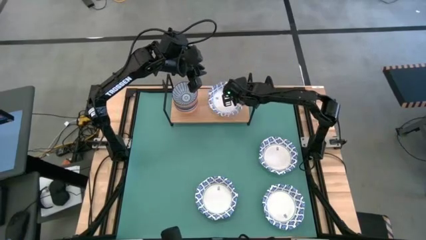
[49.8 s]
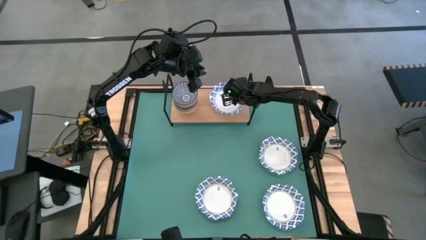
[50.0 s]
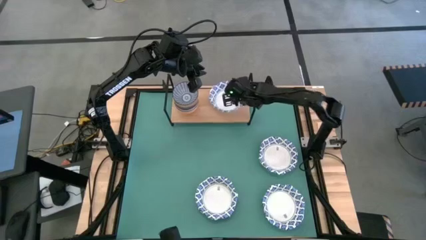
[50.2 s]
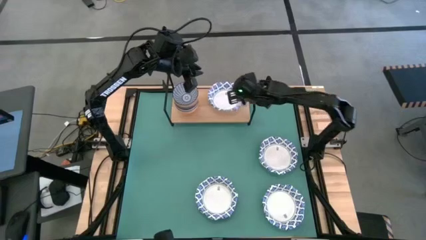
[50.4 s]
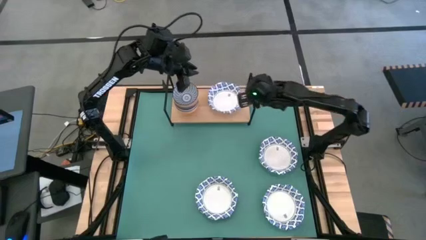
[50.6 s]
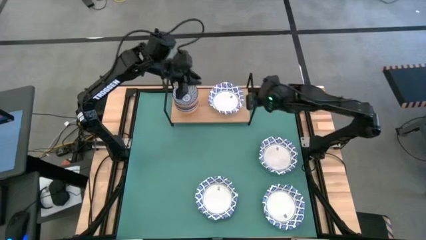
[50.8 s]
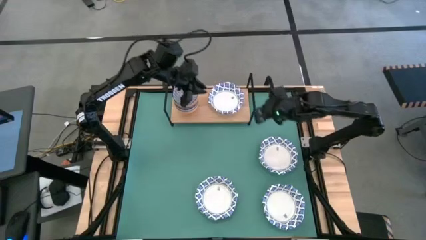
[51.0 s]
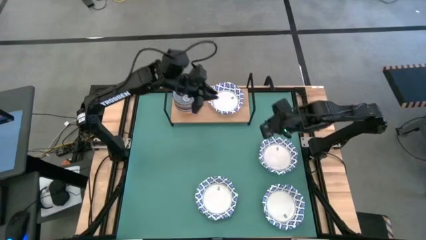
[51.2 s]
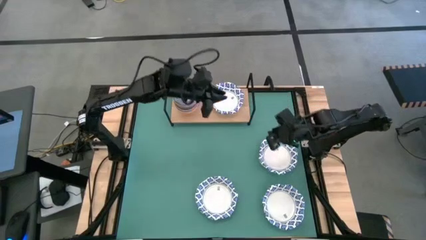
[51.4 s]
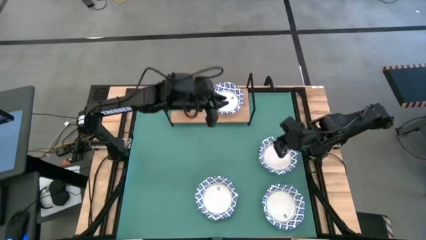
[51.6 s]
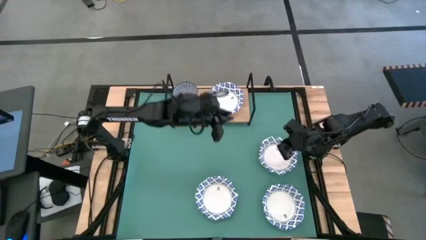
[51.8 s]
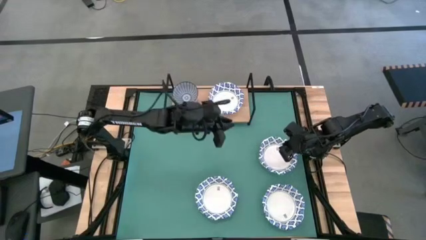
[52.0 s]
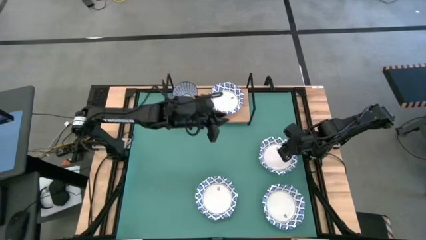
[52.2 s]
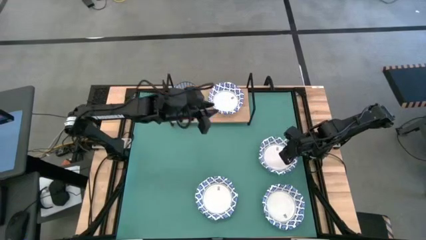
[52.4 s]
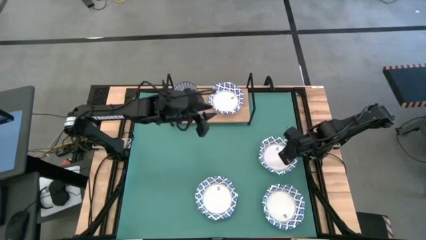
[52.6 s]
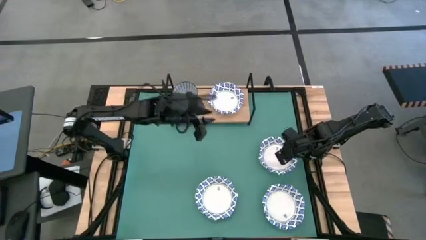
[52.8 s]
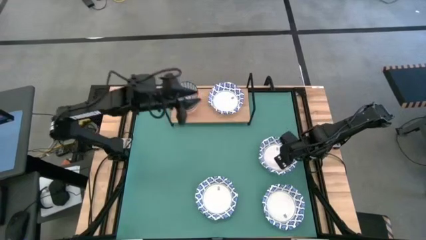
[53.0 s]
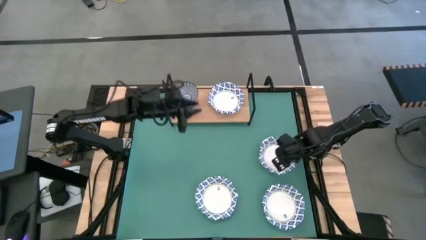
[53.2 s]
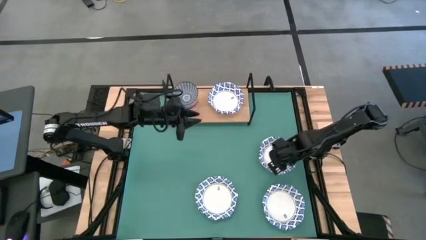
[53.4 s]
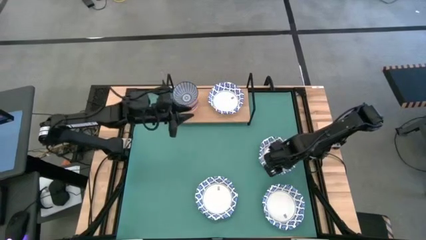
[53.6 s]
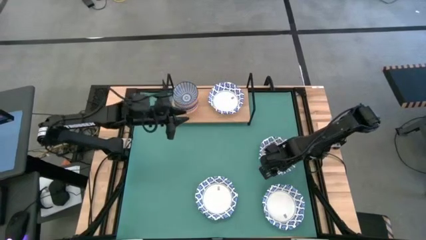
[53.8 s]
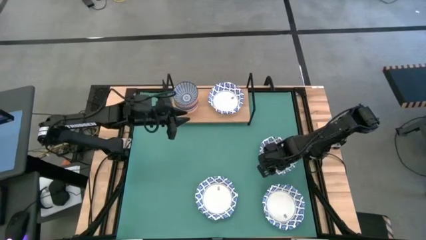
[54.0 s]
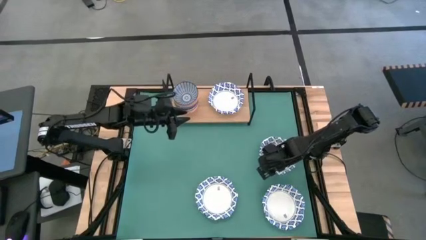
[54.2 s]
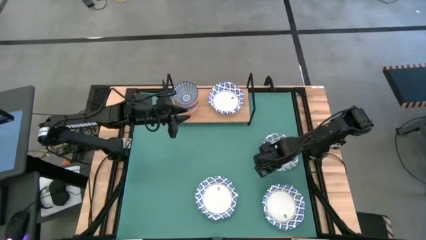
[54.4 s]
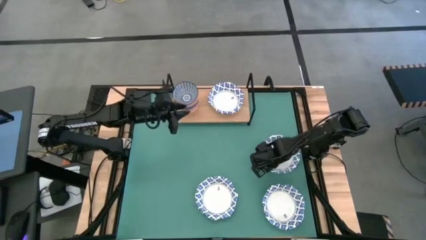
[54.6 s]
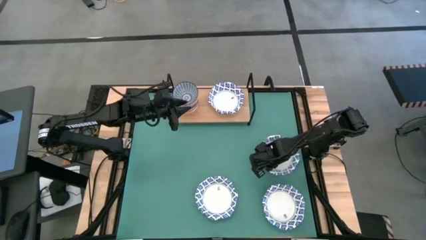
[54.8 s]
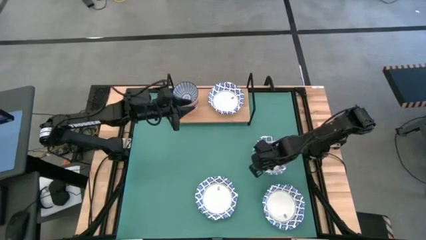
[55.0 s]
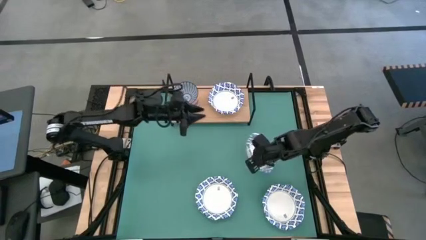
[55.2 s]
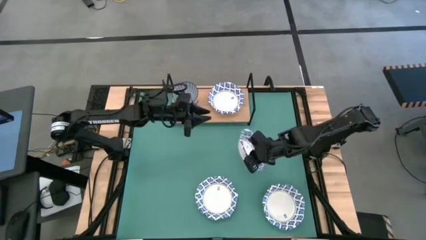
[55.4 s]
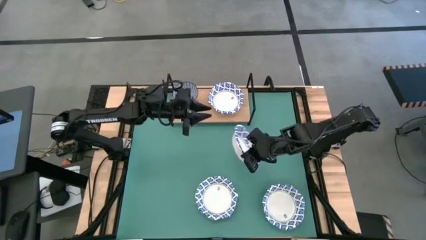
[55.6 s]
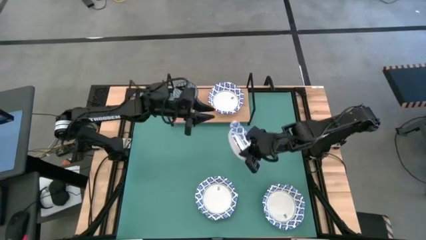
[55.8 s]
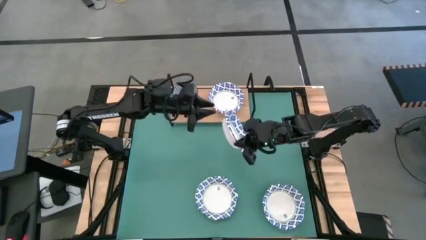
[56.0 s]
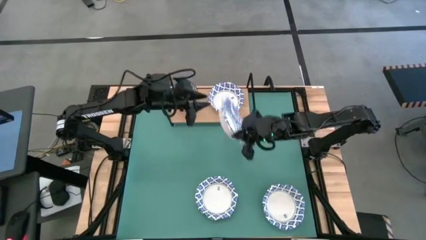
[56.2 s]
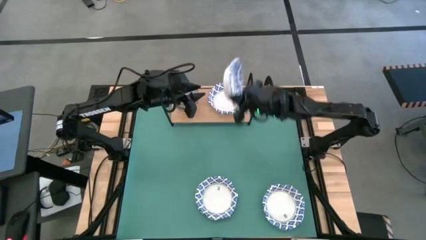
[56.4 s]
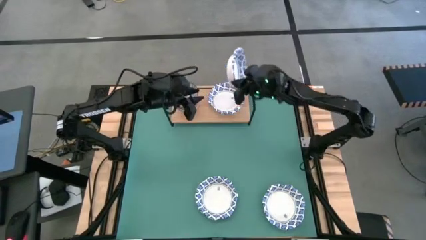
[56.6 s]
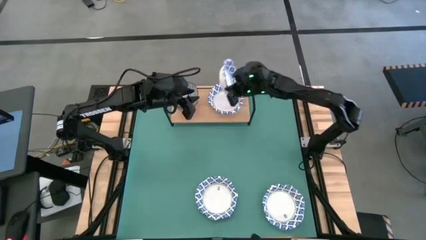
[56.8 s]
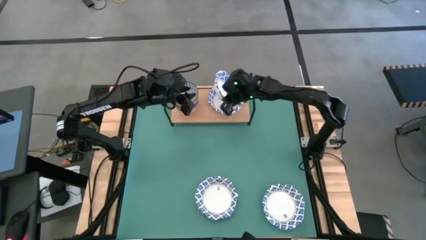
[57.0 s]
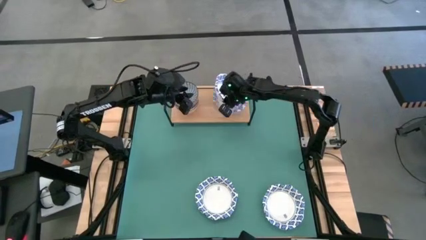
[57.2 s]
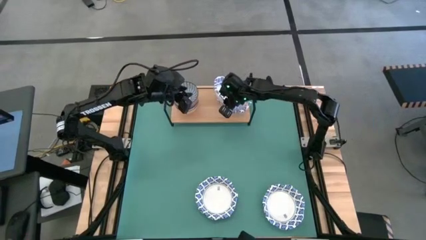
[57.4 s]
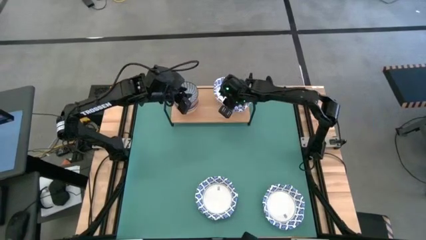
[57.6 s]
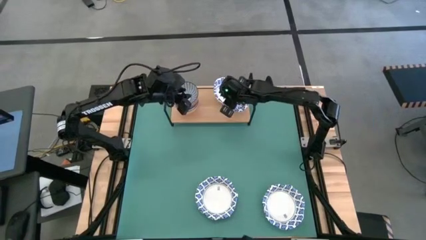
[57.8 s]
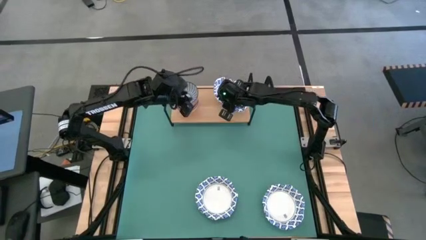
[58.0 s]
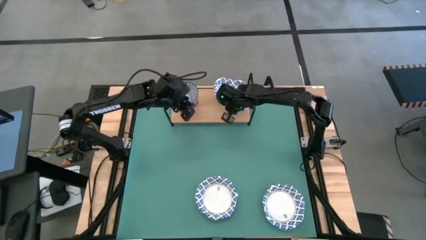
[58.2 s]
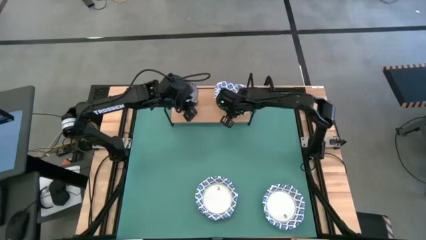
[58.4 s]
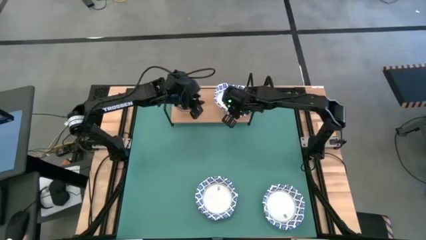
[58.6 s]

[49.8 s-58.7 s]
Task: Place and stack bowls onto a shelf
Stack the white patterned bowl on top of the other white patterned bowl on the shelf

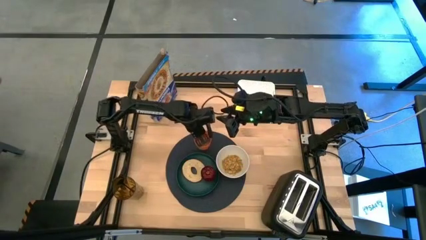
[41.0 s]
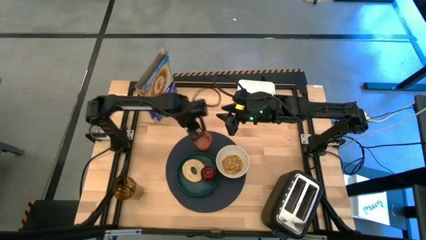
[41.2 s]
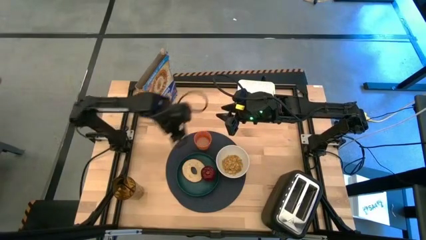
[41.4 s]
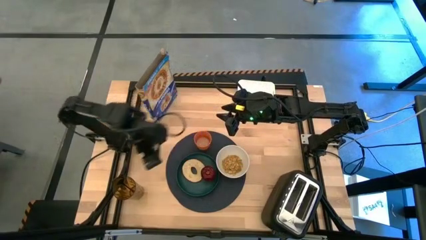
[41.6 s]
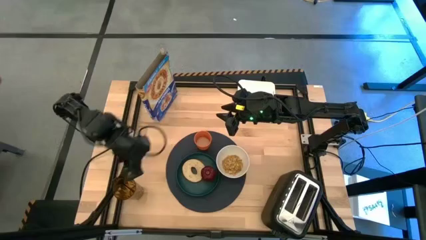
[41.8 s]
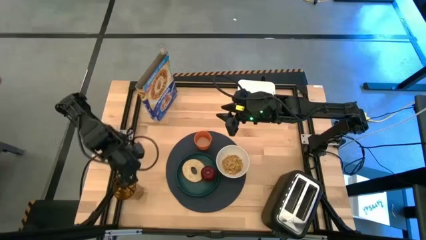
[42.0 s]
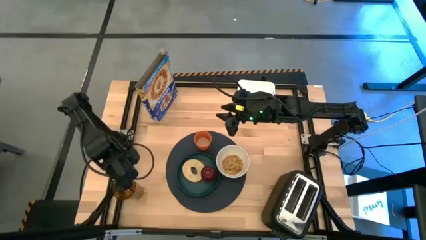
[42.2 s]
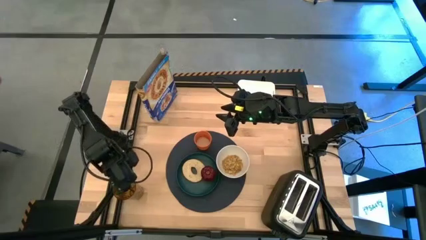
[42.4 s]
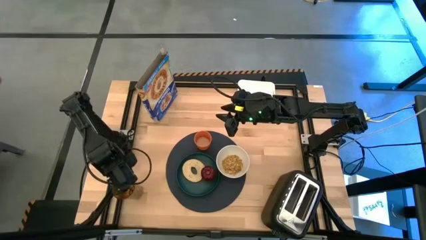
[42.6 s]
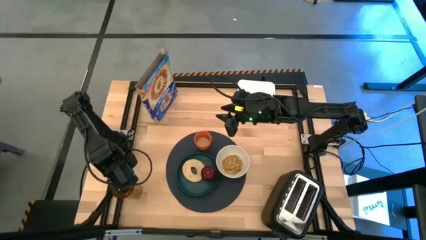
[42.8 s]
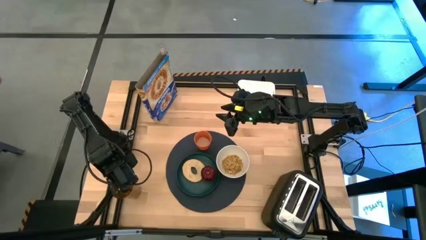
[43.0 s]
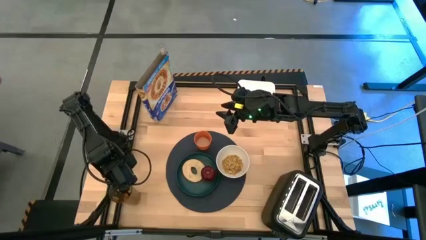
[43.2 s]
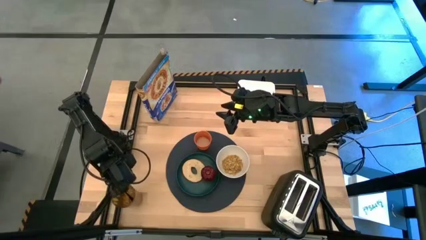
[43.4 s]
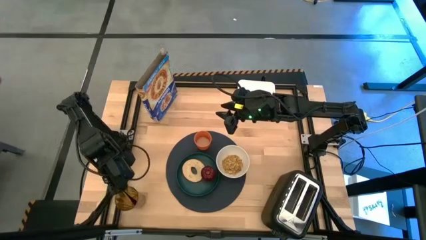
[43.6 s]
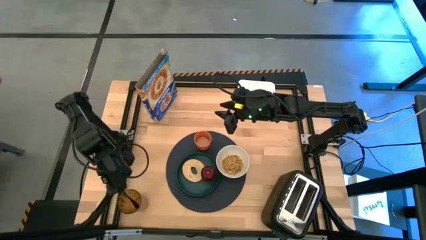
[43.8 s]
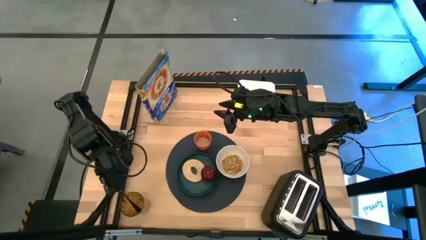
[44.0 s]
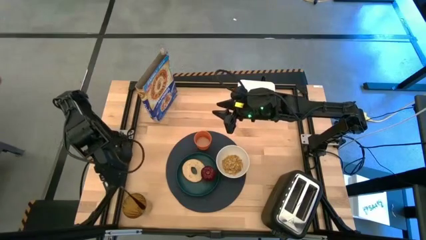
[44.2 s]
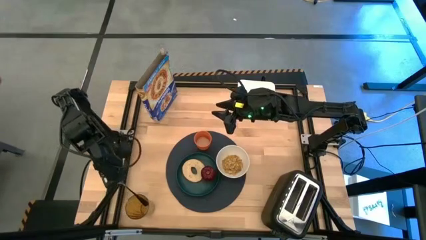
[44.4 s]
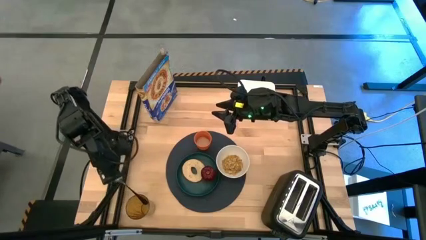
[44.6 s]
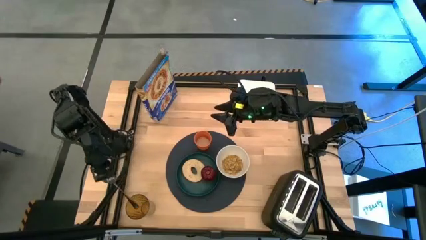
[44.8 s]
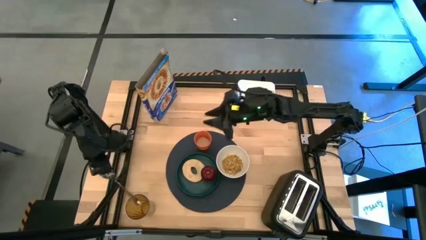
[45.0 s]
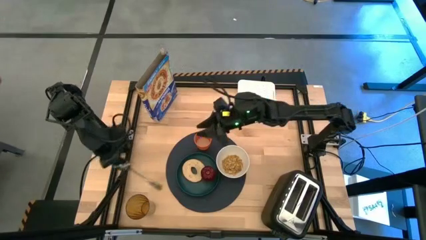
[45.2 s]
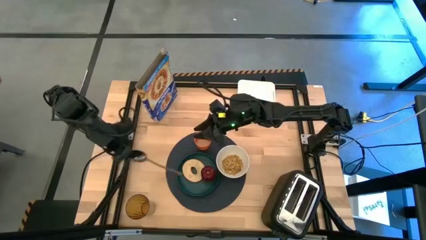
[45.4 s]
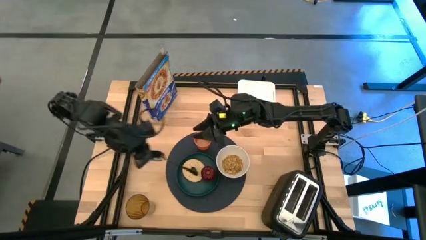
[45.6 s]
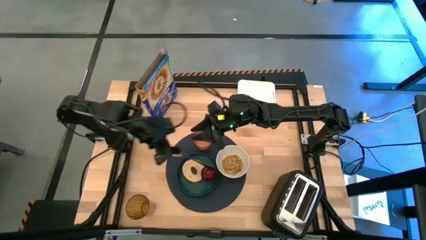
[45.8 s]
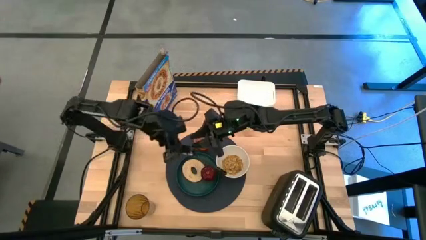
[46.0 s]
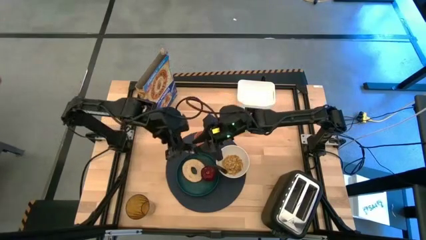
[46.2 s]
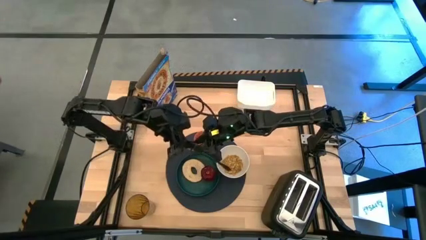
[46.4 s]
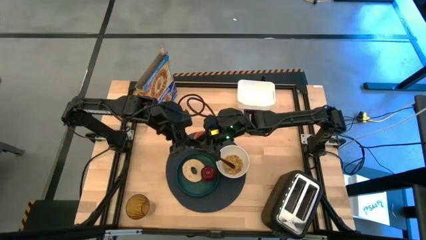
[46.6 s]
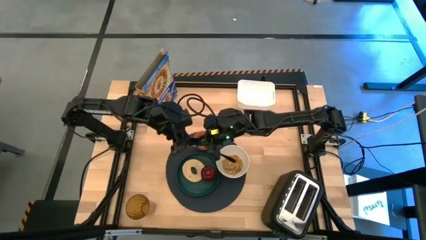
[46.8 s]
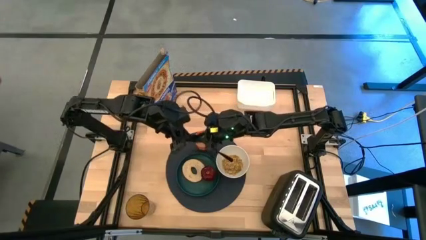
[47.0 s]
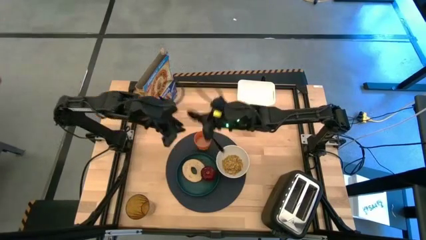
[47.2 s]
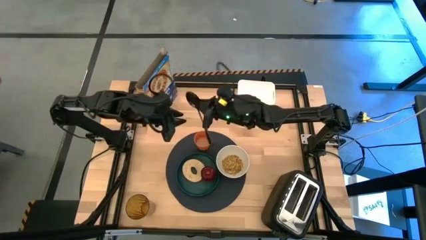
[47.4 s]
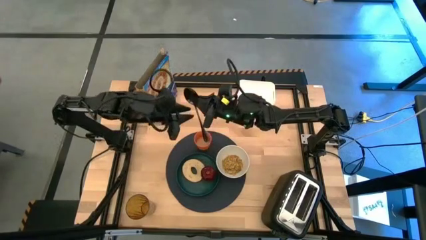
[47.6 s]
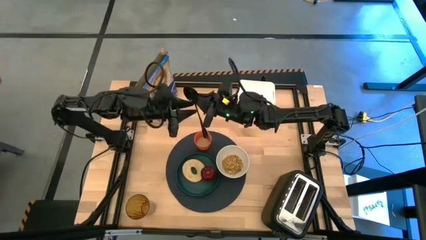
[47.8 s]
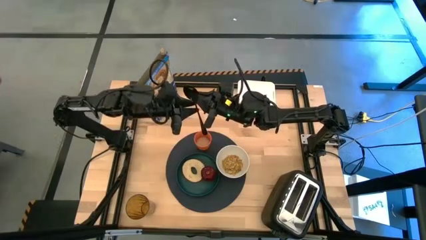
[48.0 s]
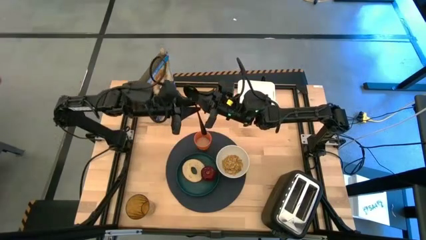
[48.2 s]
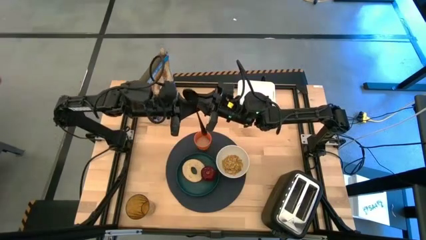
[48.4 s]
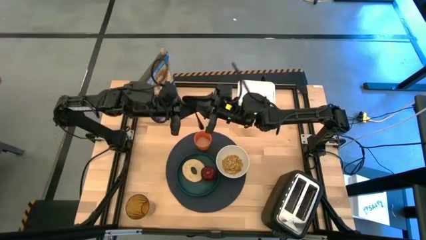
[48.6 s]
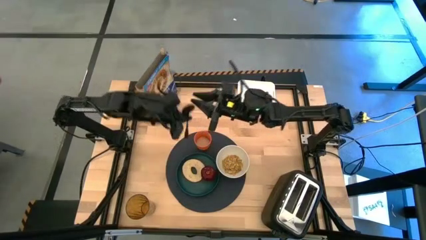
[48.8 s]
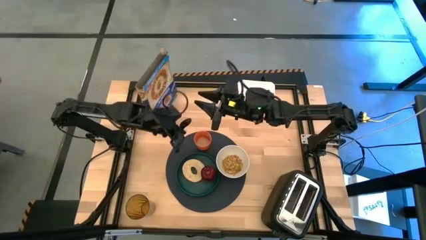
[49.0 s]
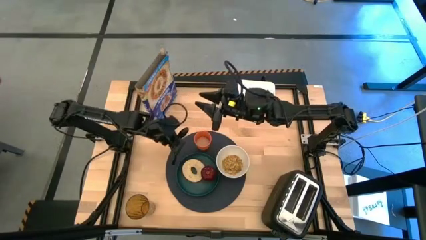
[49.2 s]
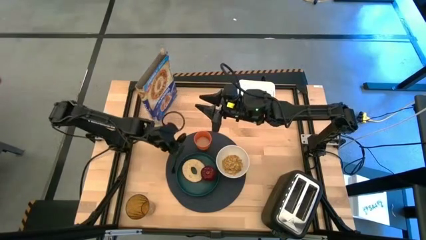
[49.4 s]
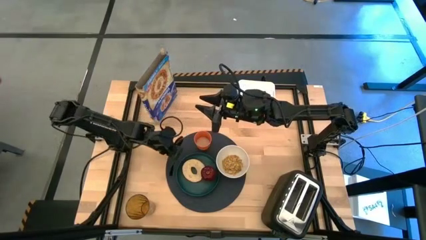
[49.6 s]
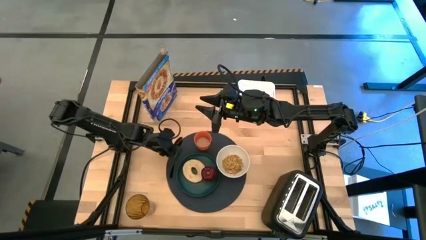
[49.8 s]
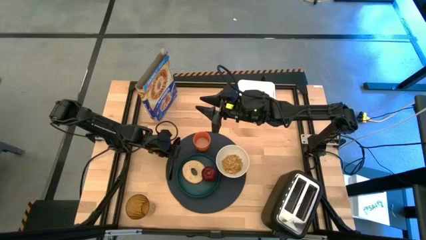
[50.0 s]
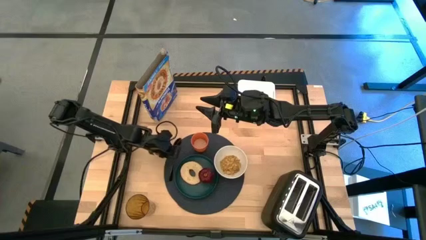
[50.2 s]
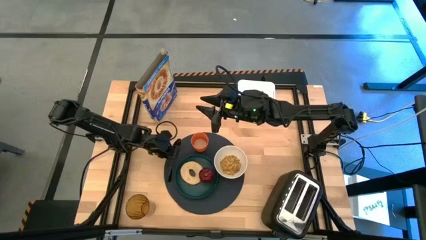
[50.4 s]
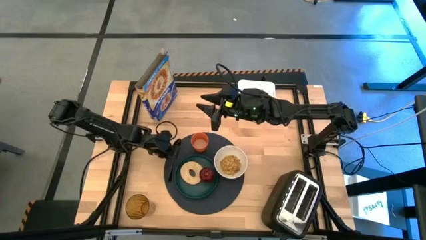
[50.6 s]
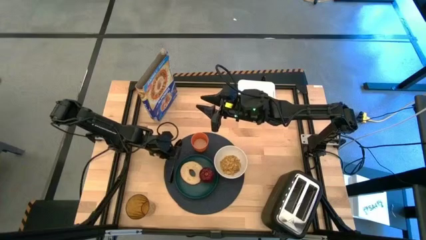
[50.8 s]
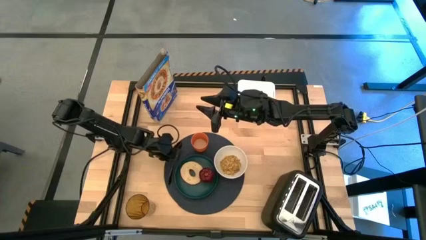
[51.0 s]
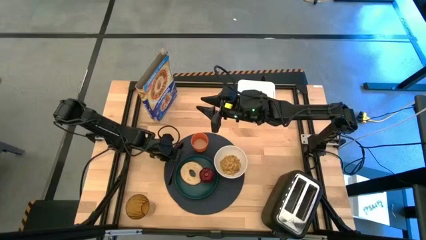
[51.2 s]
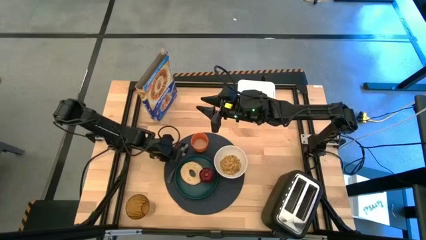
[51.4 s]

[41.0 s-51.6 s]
Task: Arrange a breakfast setting
Put the spoon on the placemat to the left of the plate
